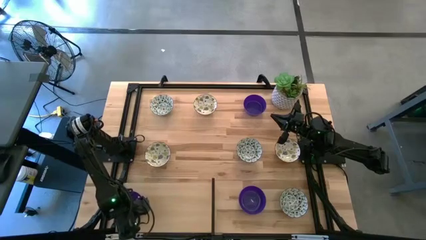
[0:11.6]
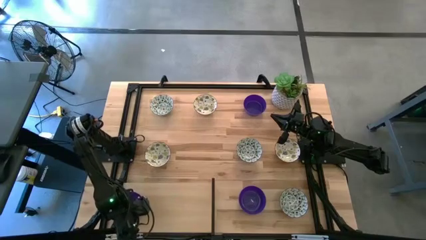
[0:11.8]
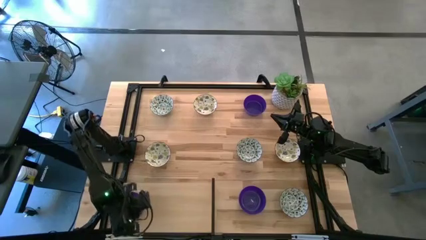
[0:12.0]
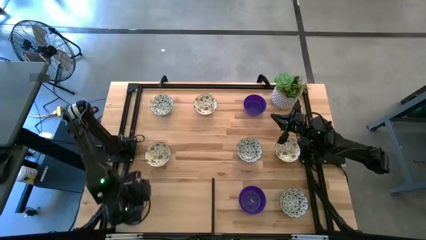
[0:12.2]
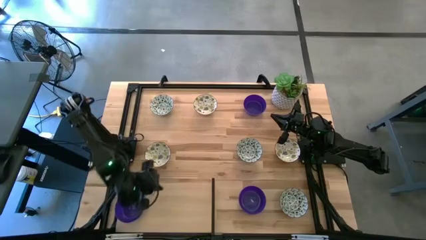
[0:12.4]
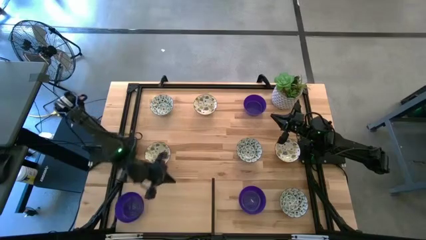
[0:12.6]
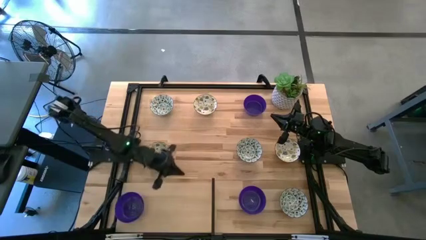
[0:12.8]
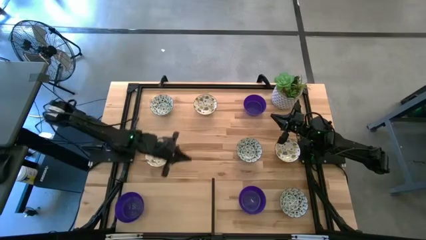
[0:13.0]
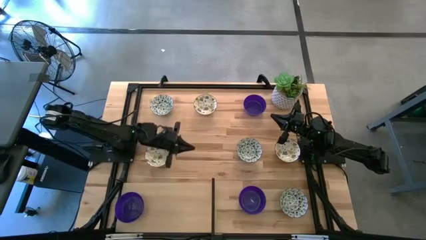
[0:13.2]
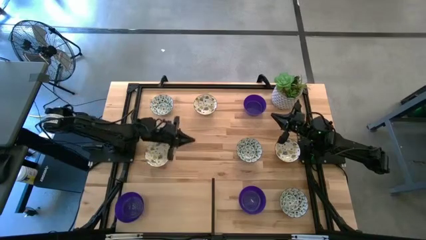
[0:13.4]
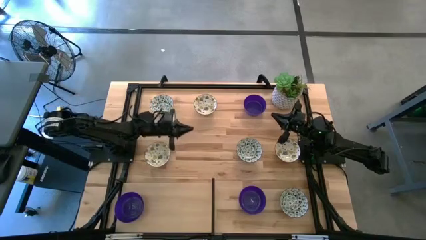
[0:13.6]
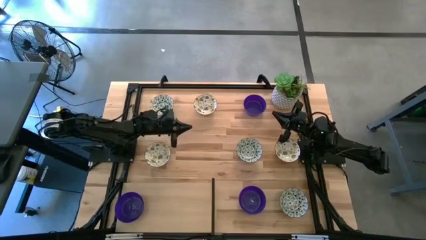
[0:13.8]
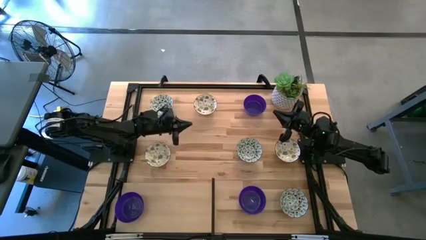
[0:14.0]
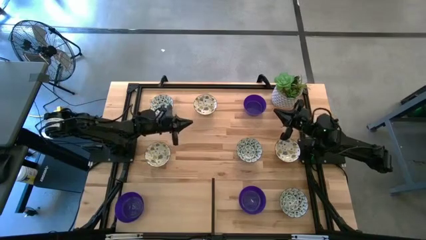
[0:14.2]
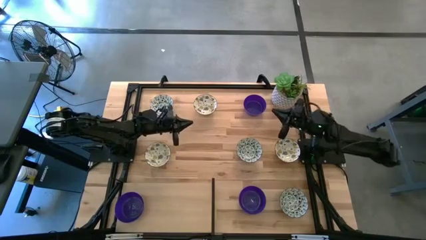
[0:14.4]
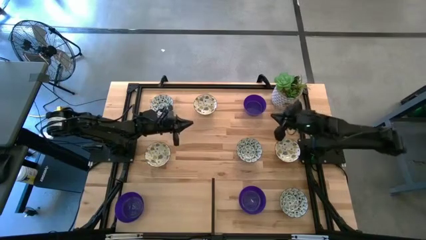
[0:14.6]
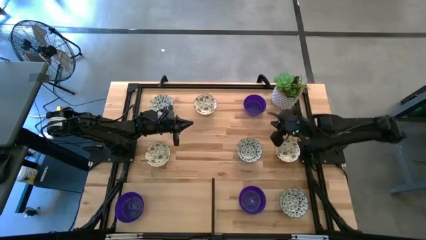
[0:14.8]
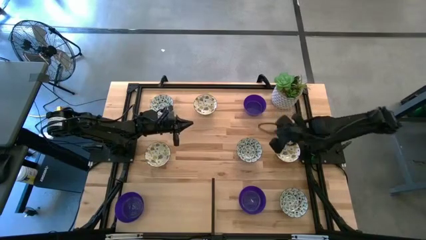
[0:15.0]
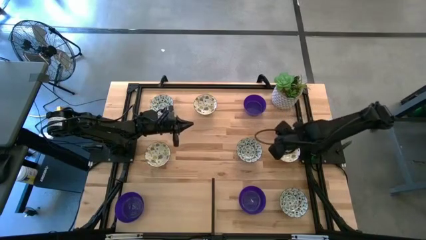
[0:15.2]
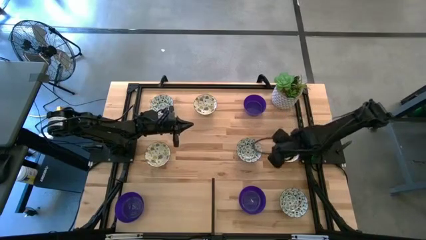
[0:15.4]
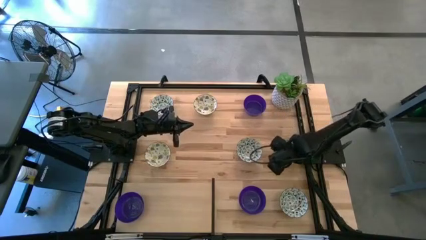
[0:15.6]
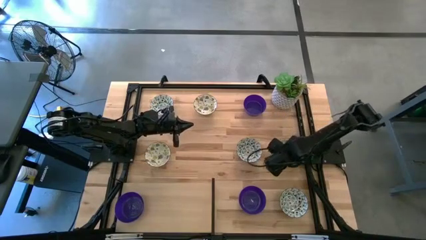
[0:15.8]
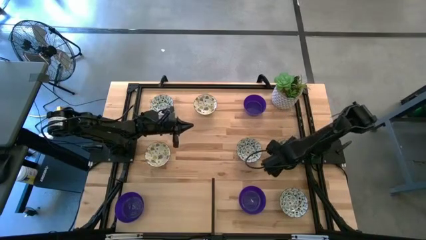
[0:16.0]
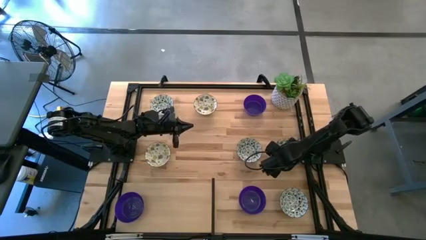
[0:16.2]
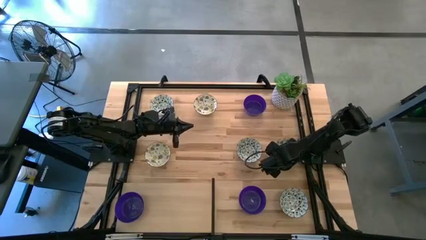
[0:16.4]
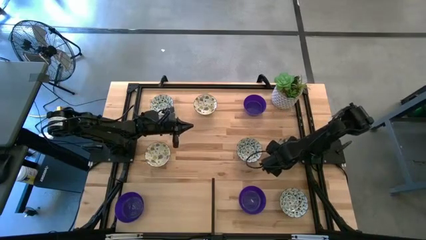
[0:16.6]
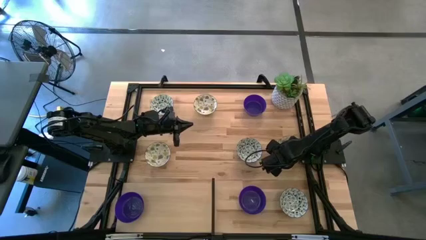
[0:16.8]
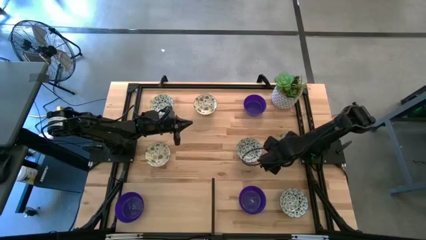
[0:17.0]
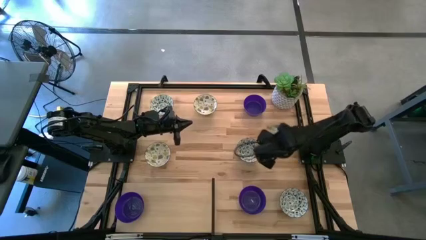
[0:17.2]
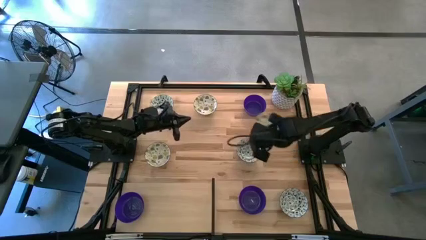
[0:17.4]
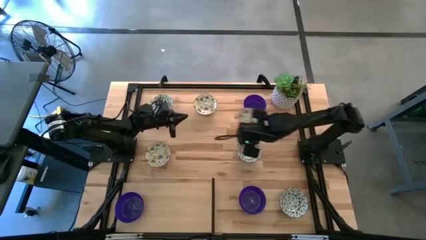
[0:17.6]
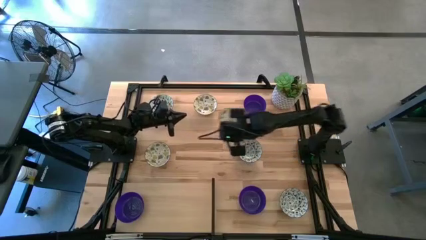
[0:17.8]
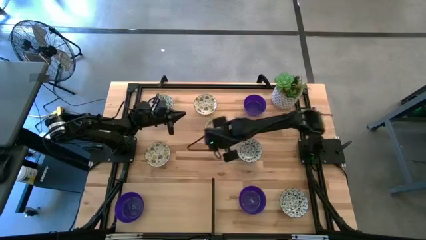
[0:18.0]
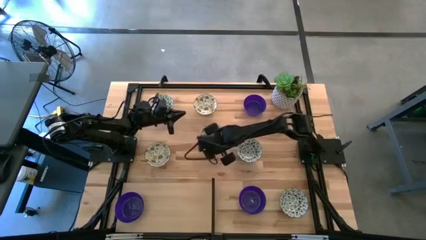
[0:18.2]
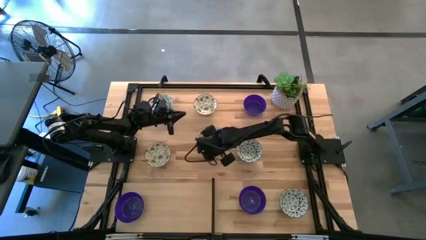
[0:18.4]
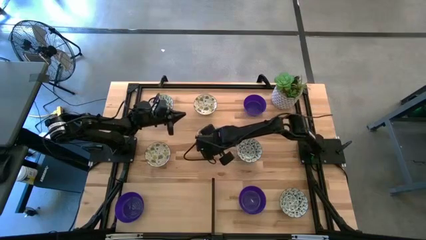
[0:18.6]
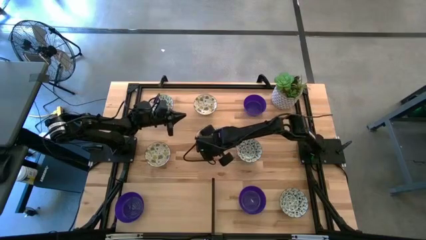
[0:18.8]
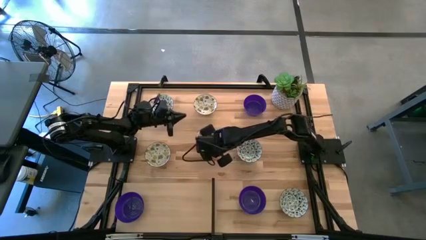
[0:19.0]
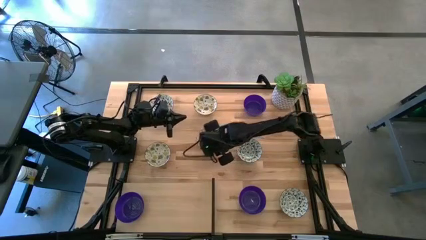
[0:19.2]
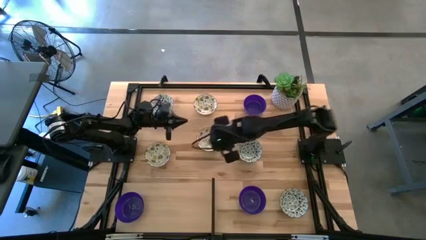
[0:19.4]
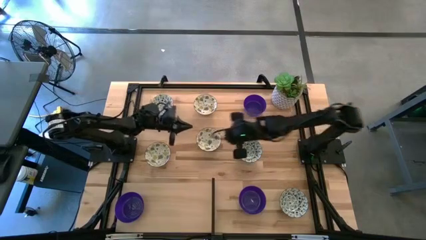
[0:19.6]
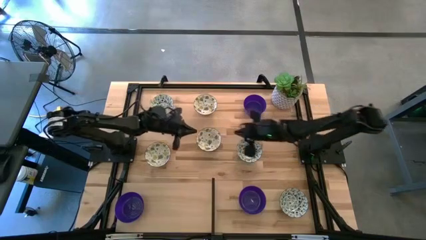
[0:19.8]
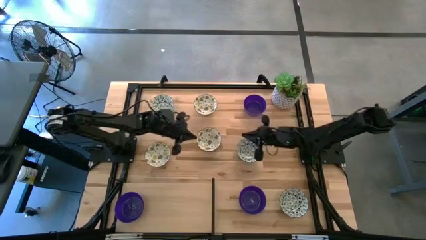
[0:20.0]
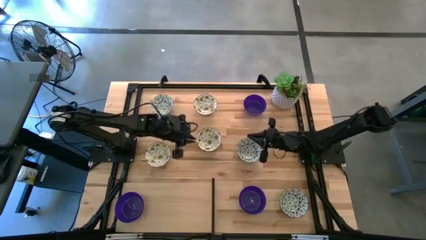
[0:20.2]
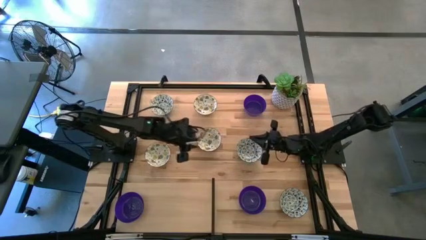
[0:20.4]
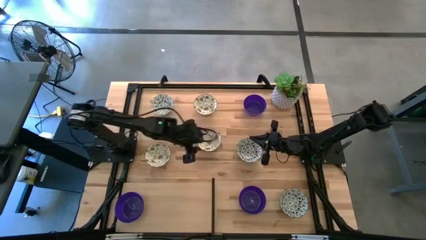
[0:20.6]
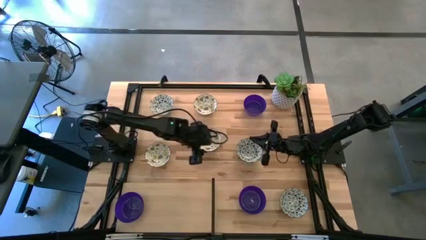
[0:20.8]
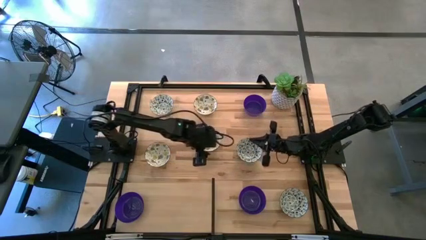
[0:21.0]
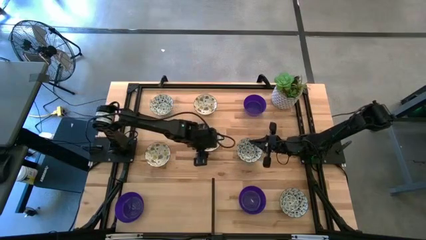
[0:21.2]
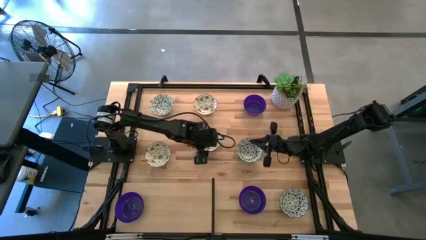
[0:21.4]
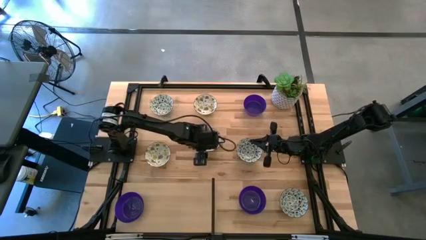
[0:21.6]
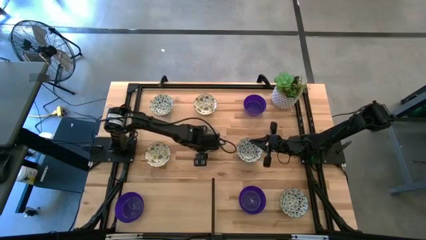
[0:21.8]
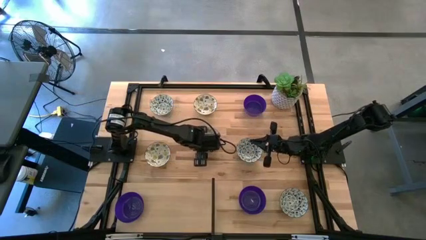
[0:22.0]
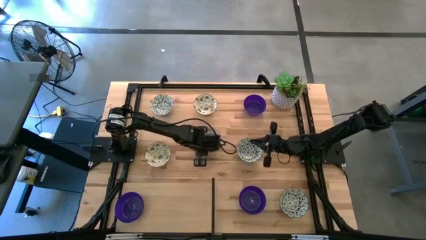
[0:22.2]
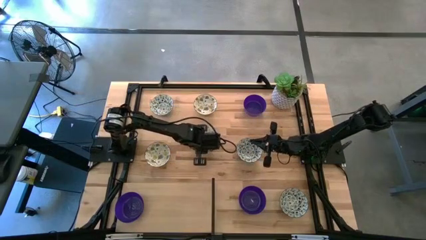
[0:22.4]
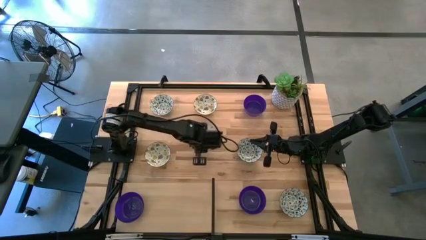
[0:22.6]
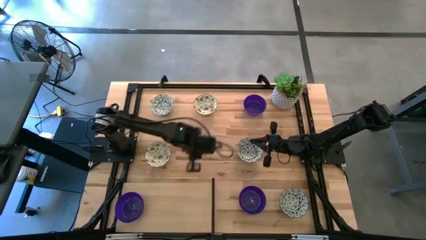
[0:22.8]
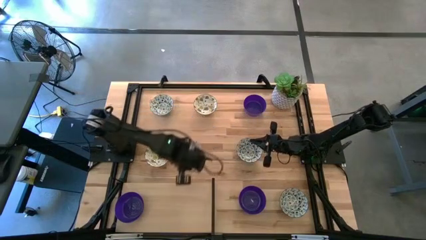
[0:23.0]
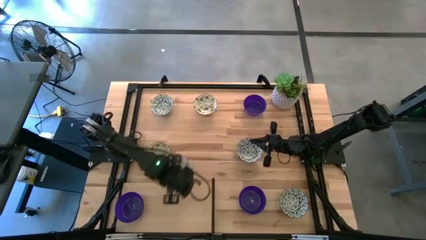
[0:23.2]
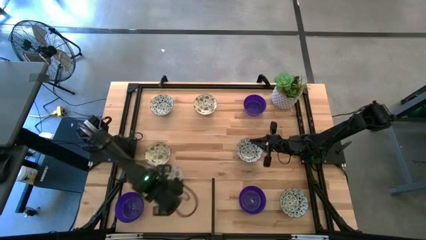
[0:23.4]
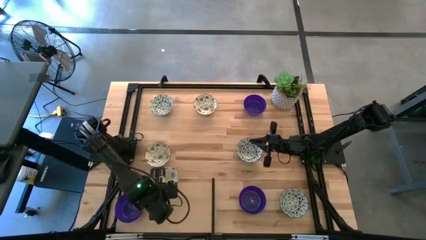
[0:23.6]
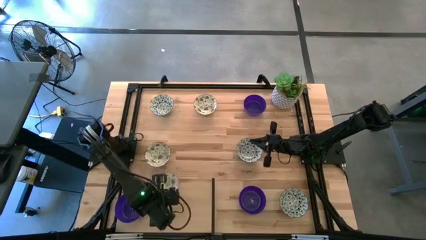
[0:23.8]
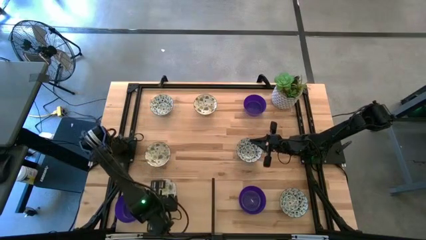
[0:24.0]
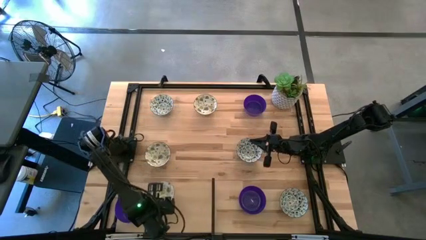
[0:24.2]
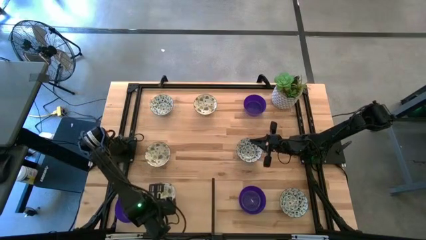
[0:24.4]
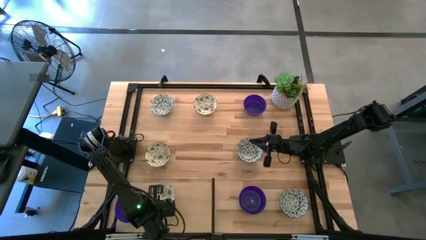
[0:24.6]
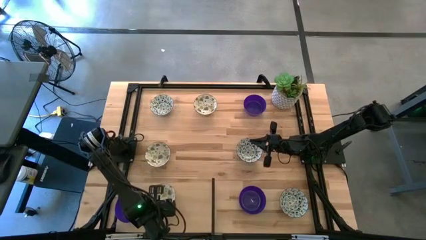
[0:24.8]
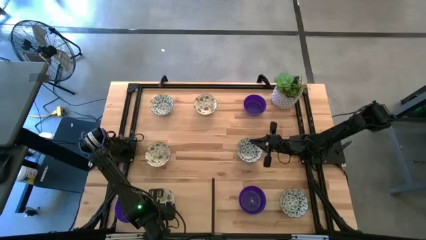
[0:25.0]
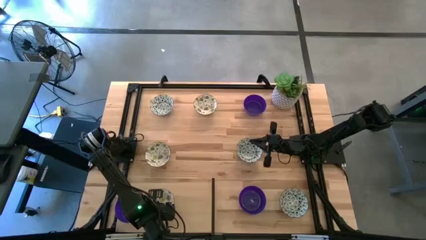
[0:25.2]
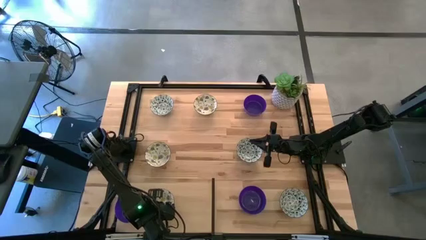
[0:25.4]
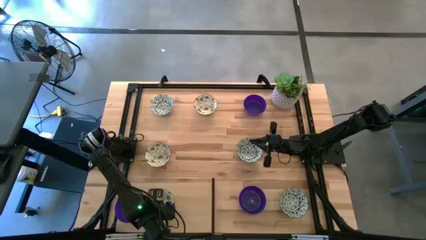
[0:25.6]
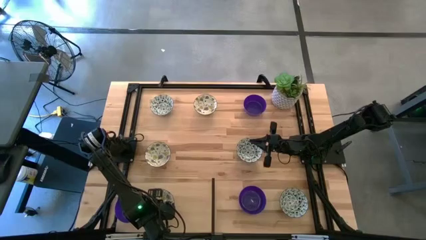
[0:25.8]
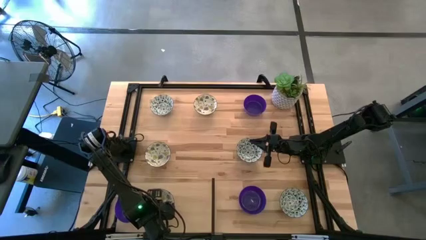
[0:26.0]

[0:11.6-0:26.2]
Task: Pick & Place Mini bowls
Put the right yellow patterned bowl on the shelf
